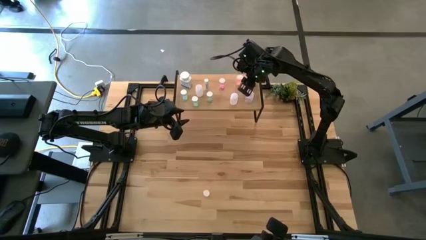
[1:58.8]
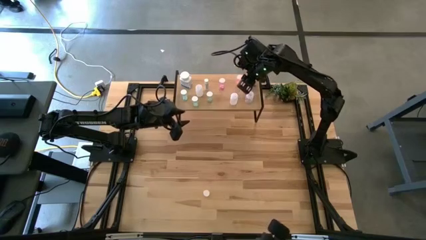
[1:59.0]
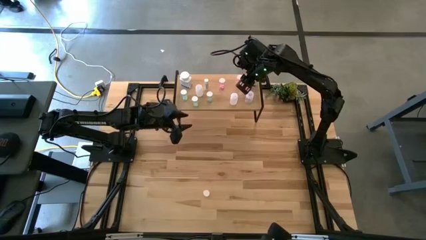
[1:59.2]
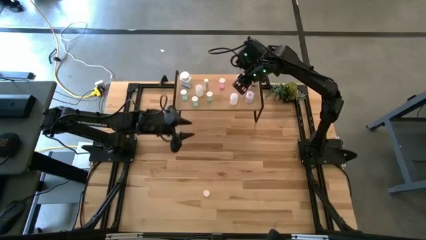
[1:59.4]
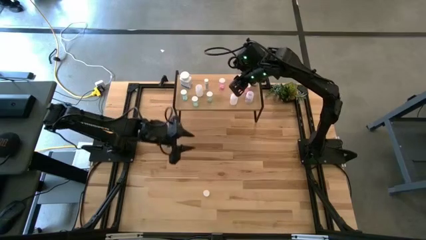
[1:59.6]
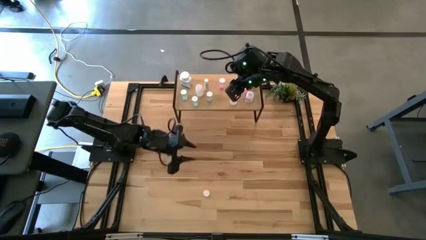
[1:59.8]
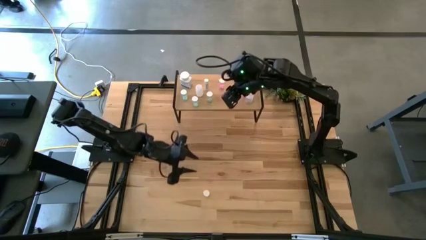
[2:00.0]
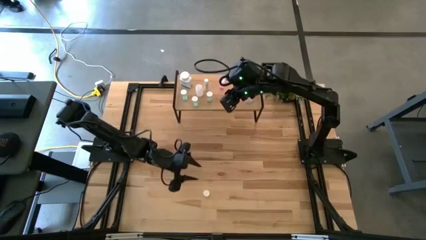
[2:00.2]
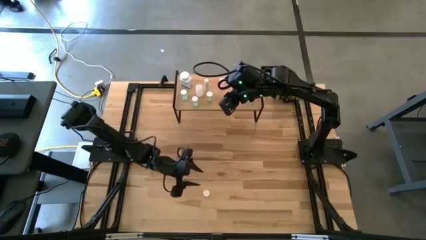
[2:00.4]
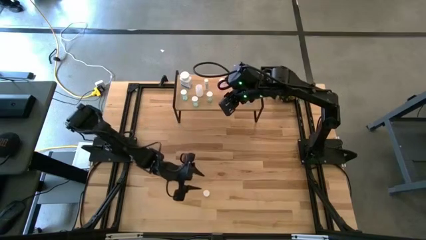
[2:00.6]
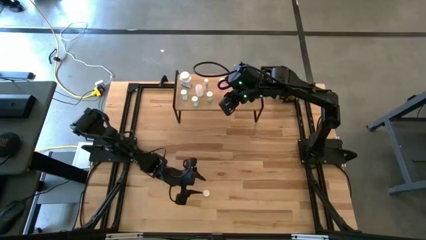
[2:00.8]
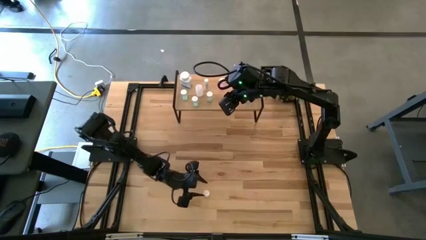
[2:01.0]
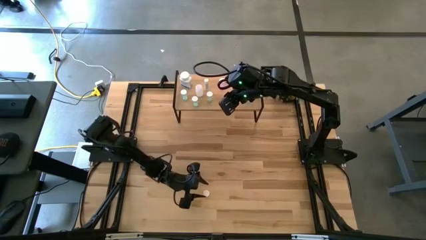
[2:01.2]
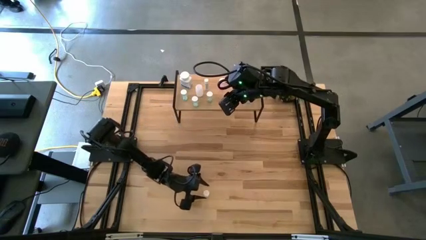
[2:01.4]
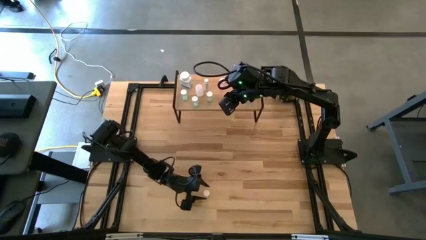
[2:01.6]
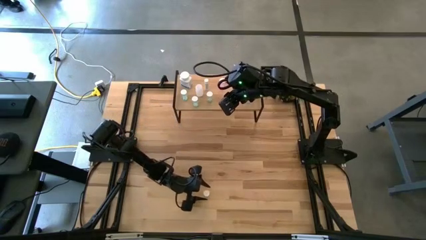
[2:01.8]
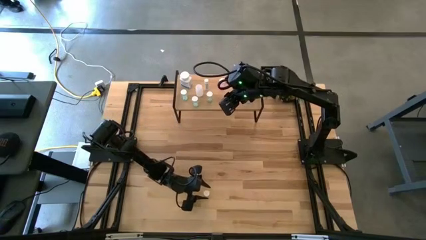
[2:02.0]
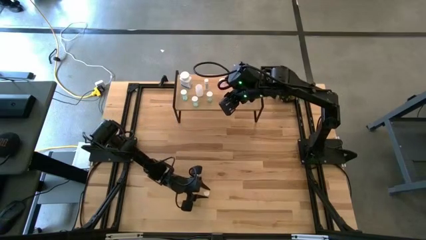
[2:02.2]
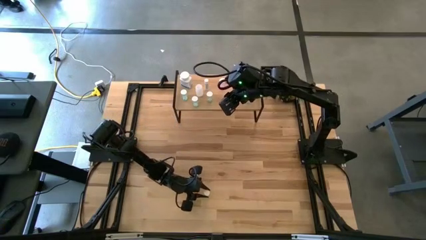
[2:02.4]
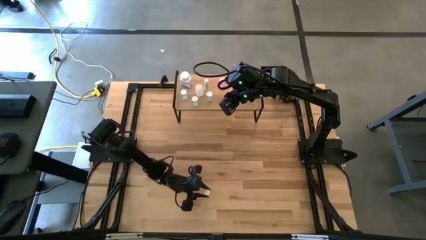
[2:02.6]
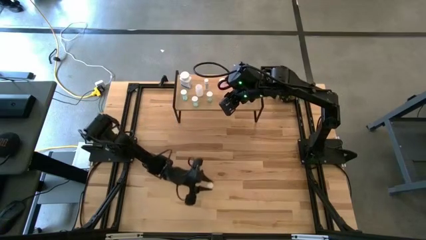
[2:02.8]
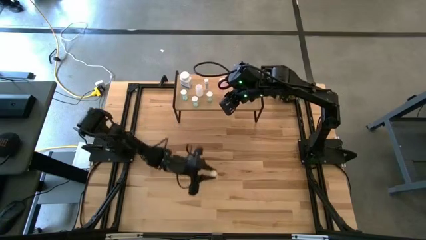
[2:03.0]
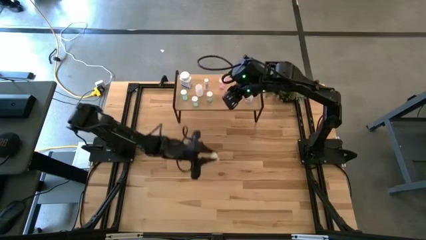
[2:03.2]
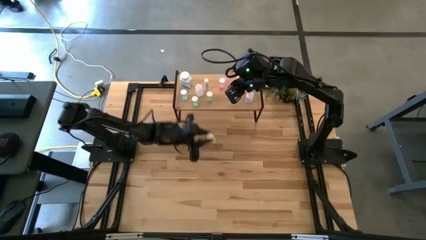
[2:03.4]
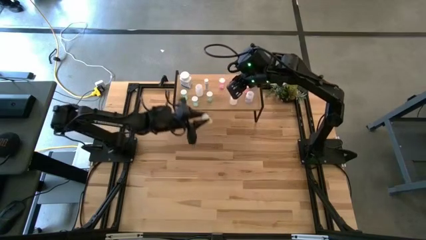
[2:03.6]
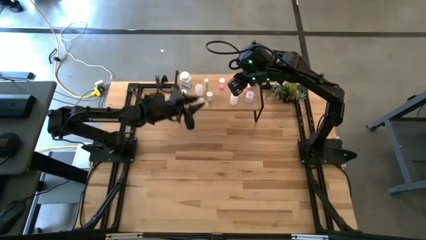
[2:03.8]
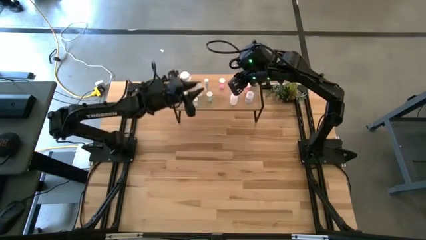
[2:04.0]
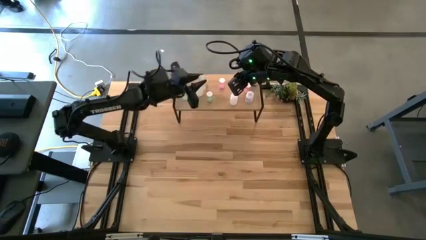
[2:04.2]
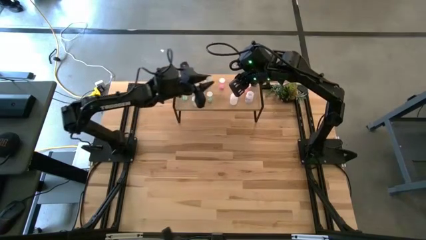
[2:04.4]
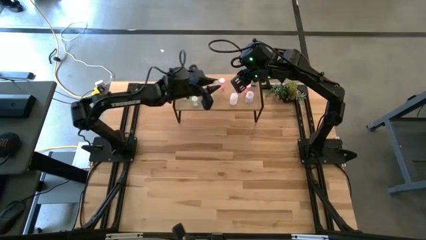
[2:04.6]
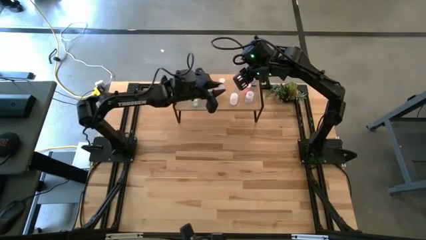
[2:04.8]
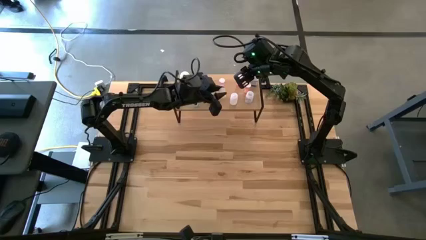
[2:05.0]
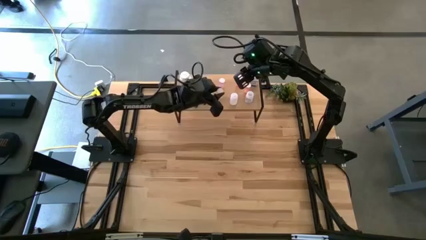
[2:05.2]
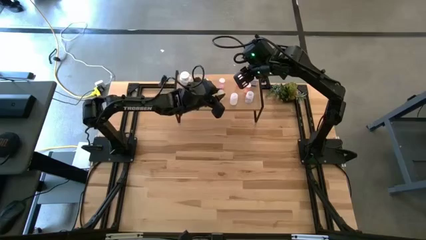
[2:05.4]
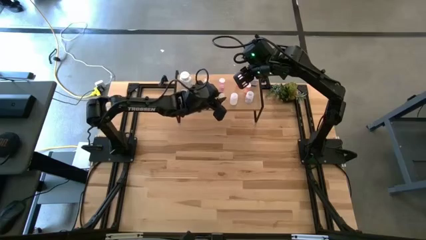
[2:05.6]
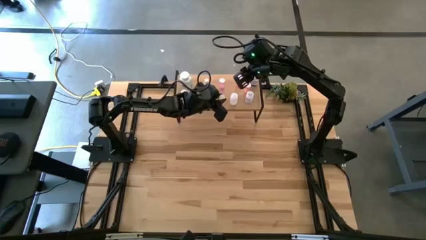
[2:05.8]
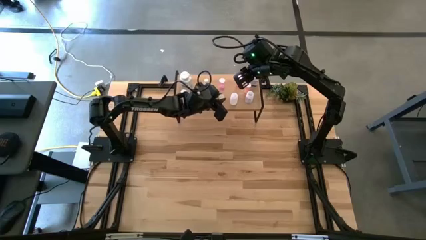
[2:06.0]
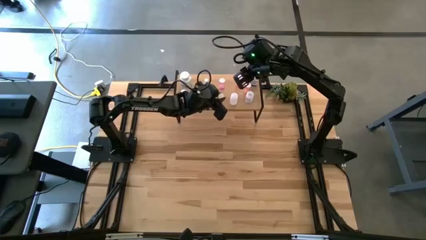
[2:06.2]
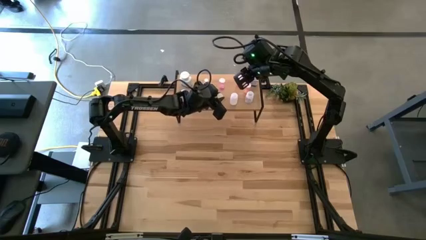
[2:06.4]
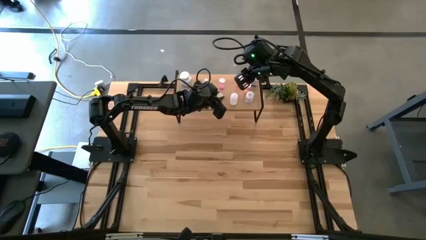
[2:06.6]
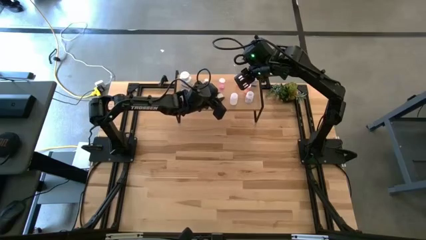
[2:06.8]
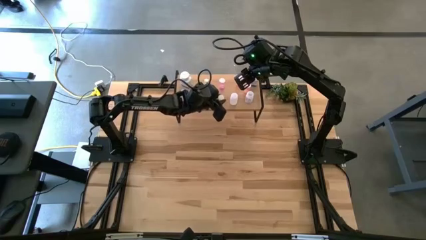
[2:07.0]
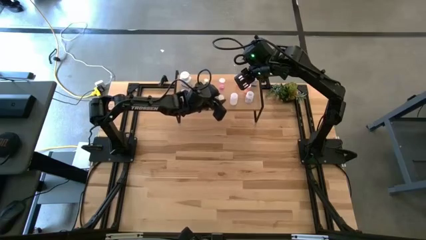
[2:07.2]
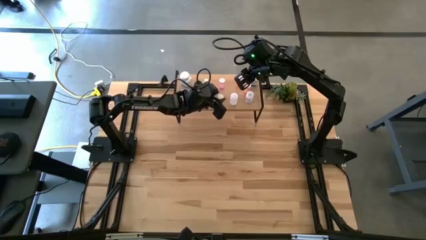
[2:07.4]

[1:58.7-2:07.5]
Task: Pick and place medicine bottles onto shelf by color
Put the yellow medicine bottle on the shelf

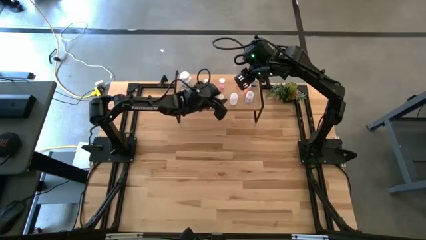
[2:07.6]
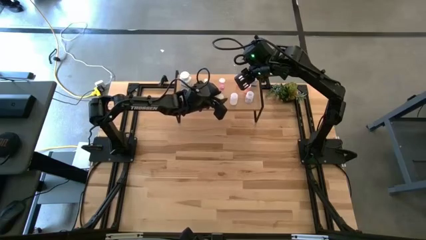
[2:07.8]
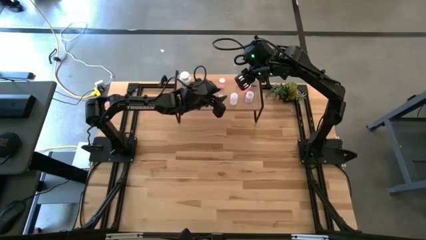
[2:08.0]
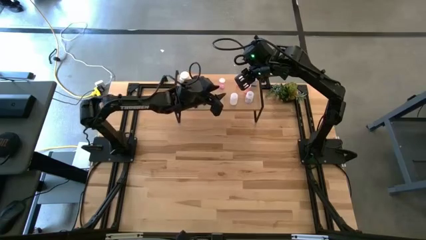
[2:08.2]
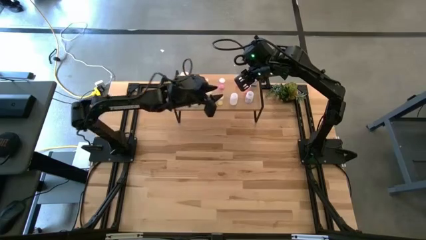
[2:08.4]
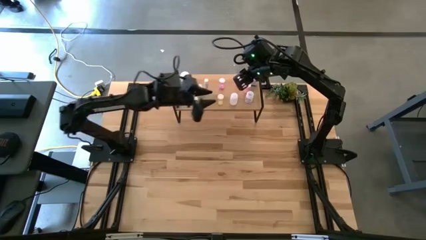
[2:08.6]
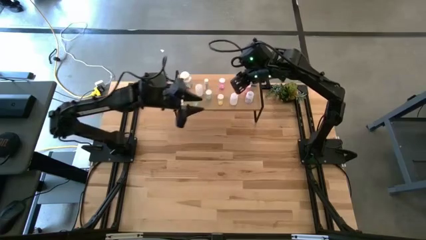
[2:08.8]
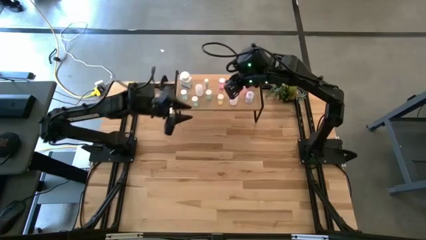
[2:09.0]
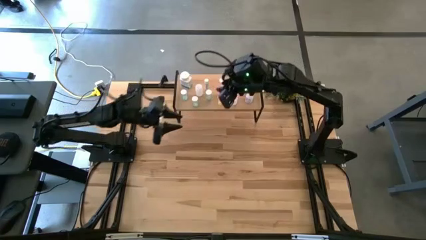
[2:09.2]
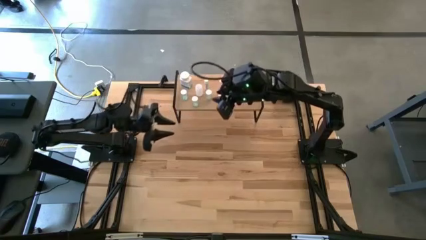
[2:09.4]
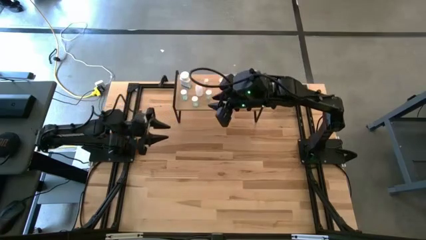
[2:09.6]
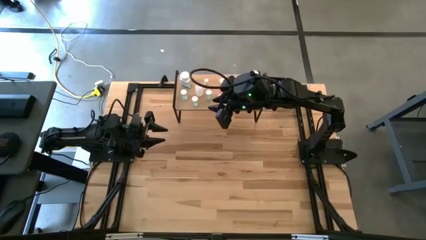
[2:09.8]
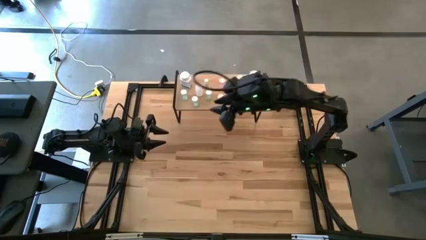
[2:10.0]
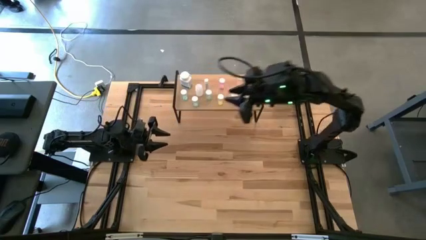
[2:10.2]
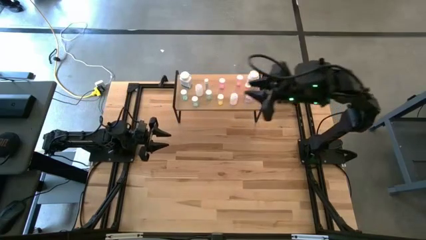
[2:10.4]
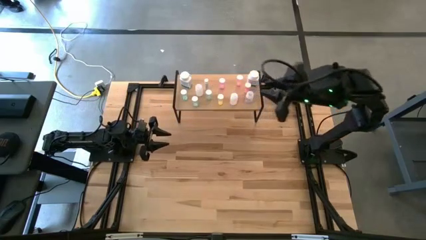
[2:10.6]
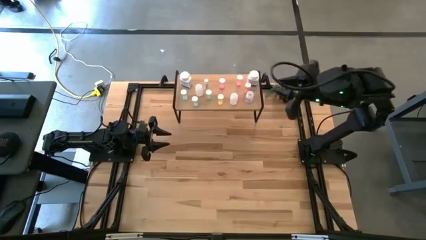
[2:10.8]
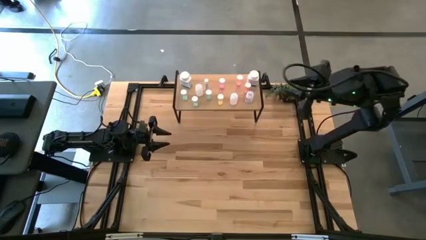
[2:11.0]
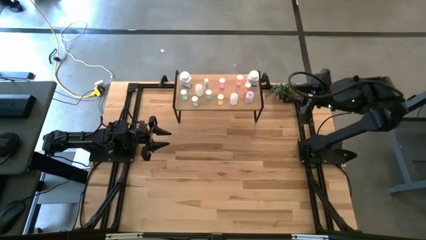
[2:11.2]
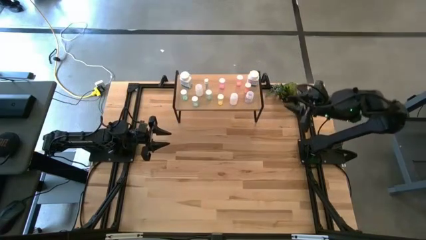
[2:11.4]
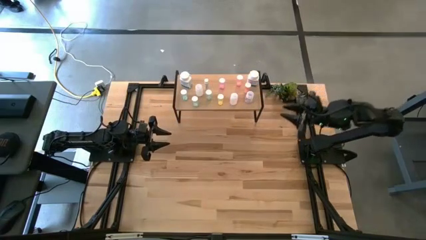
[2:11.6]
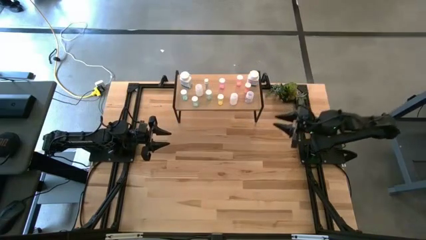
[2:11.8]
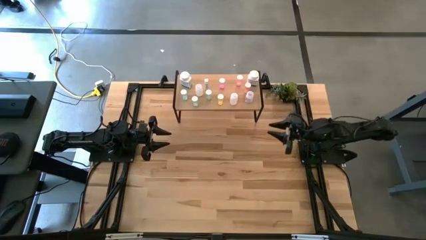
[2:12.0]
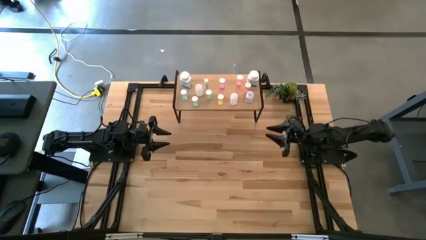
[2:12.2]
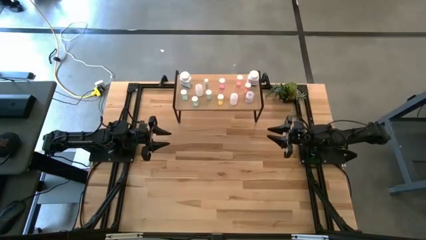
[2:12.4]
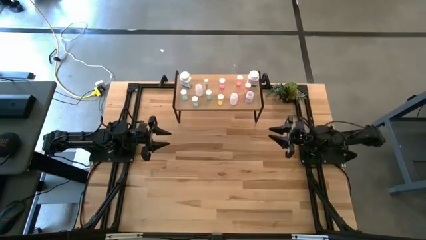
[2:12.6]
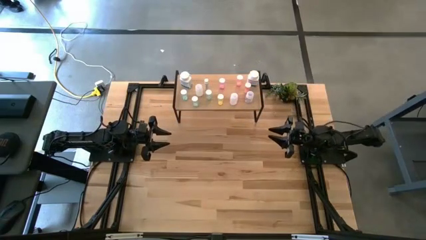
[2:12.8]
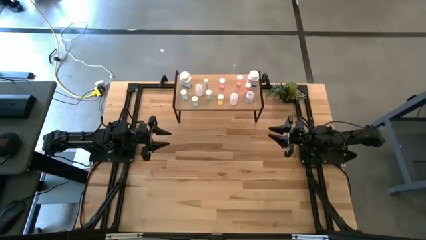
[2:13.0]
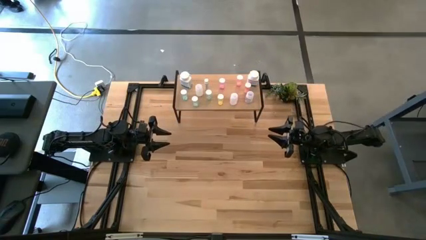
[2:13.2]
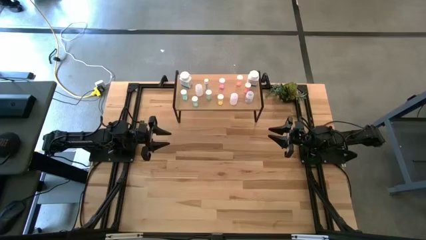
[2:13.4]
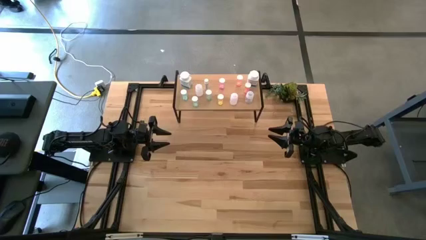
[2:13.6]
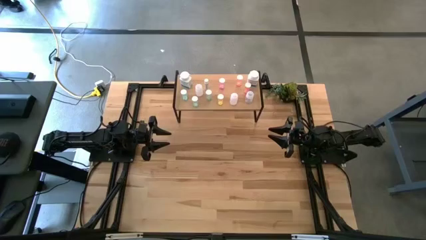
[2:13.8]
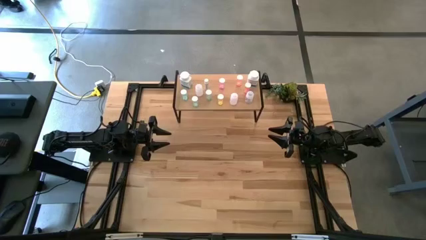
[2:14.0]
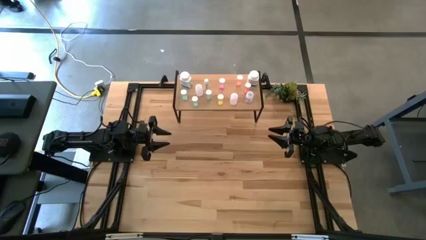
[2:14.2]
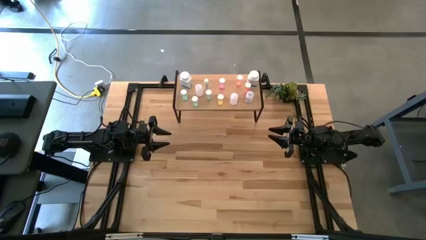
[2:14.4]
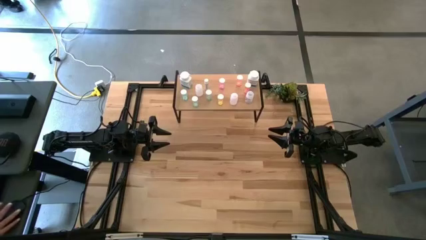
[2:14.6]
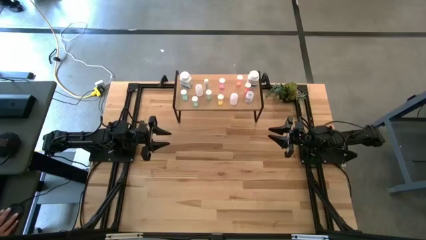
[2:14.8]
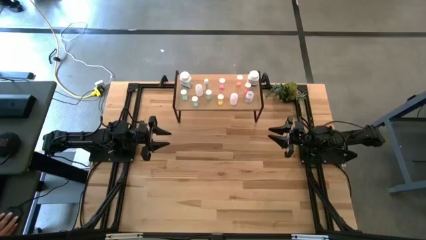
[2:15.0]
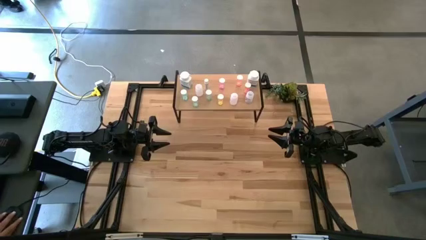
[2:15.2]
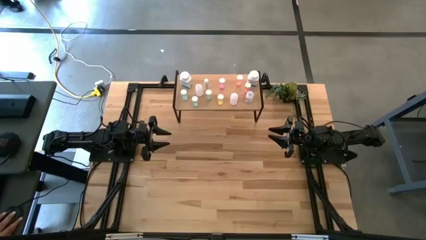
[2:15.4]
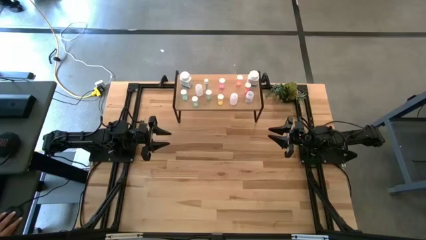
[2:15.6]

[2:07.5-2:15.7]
Return to Home Position
